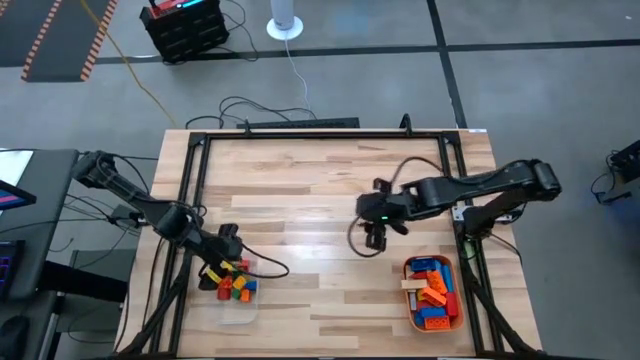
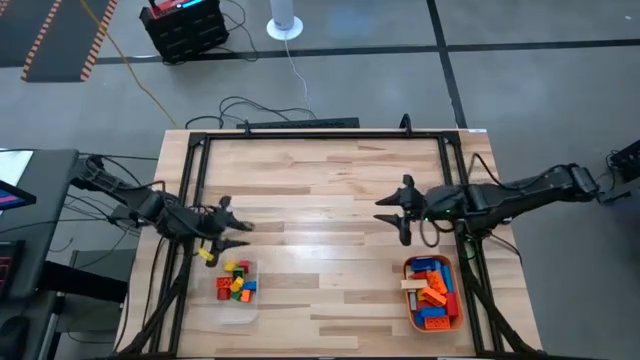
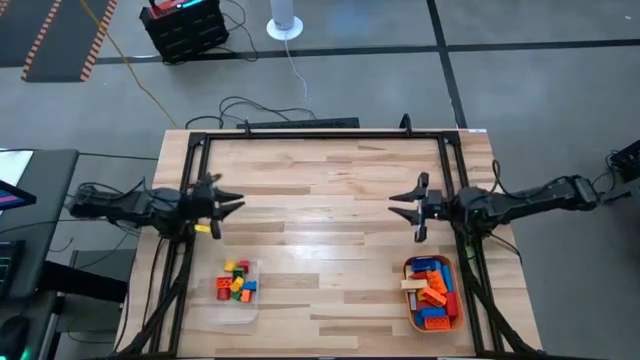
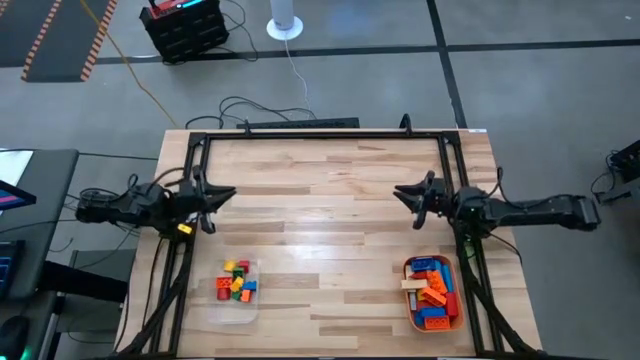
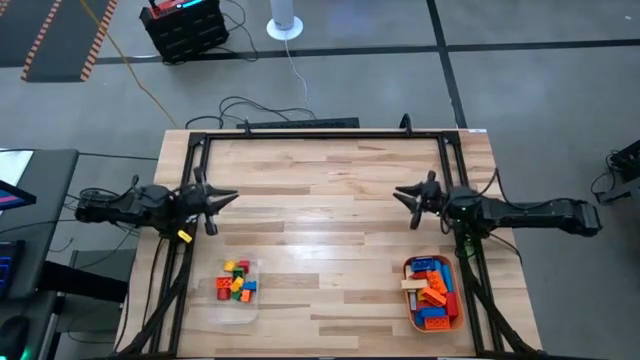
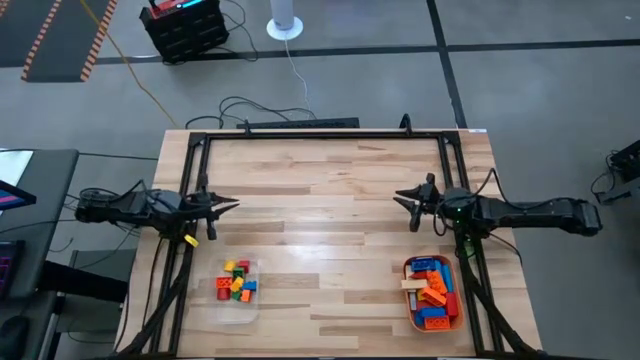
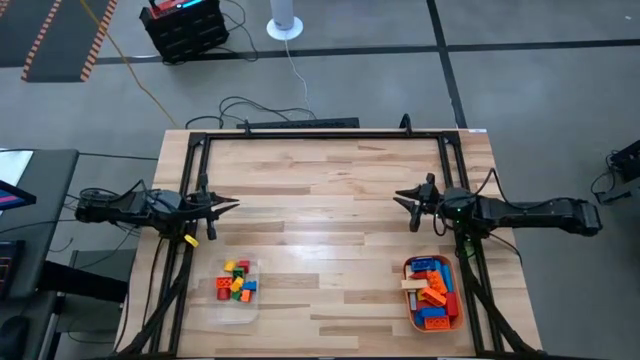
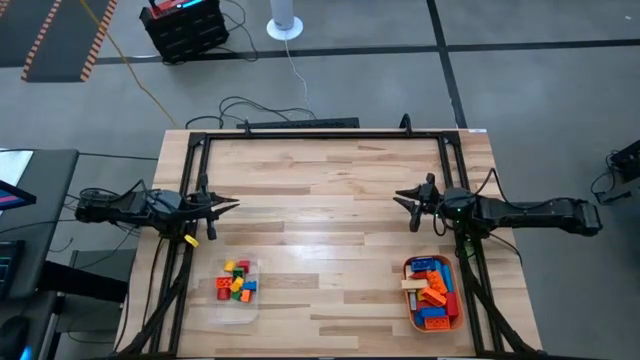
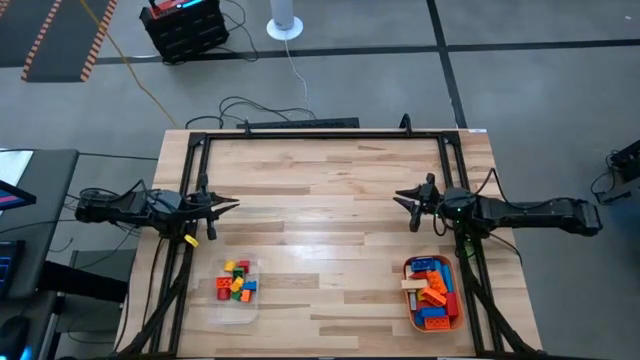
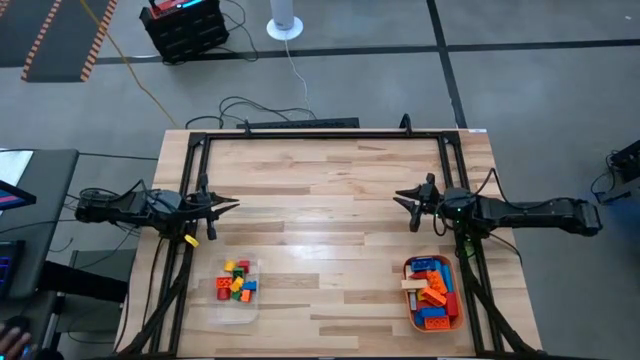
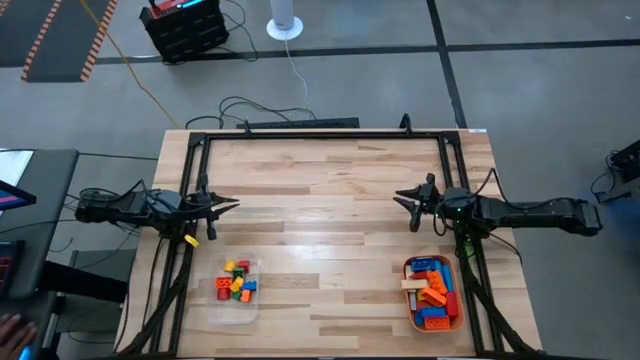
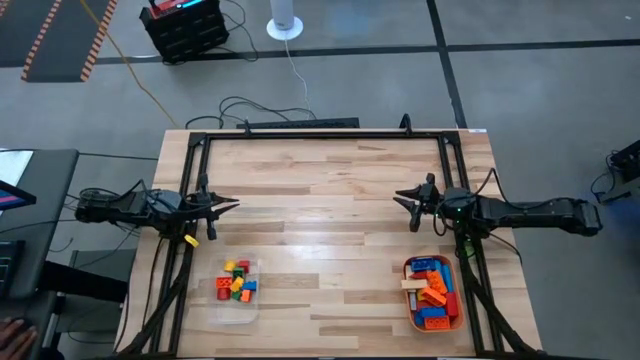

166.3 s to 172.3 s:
Task: Sort blocks by size
Return To Home Position
